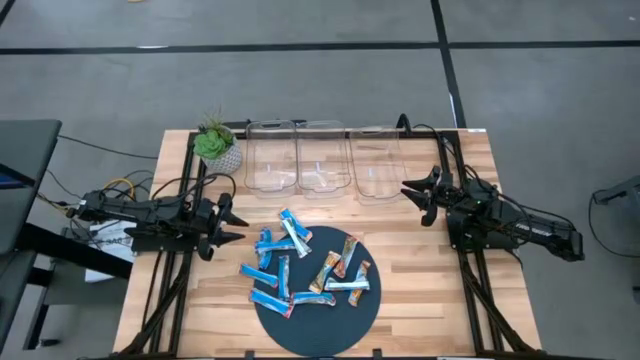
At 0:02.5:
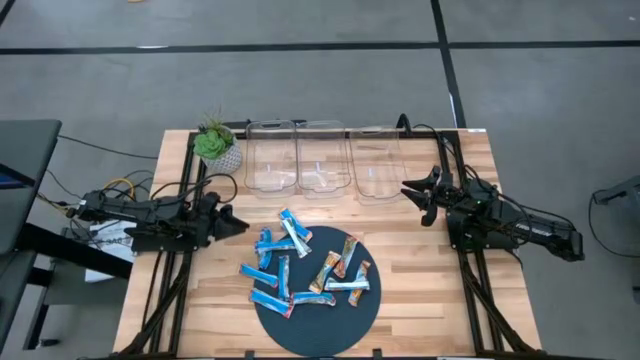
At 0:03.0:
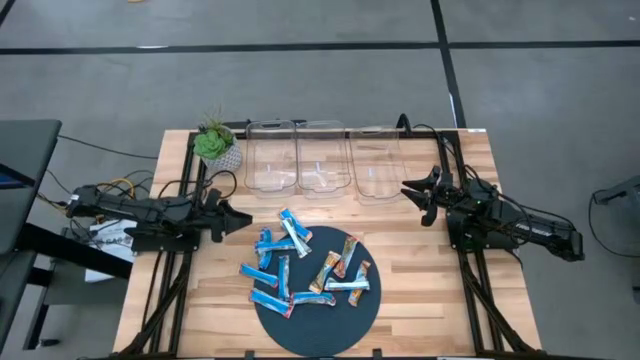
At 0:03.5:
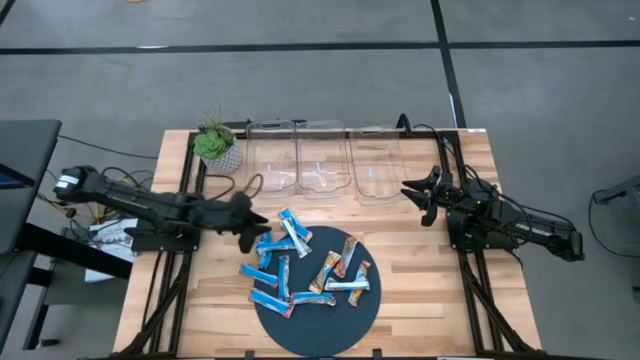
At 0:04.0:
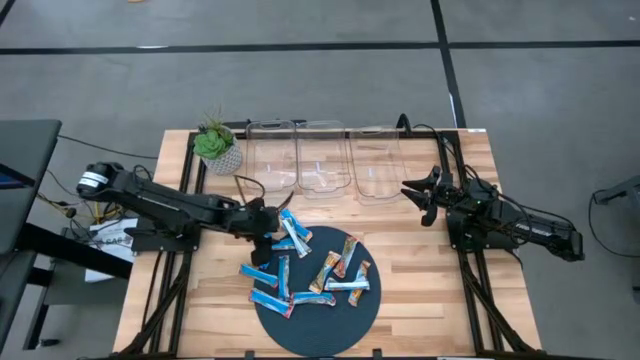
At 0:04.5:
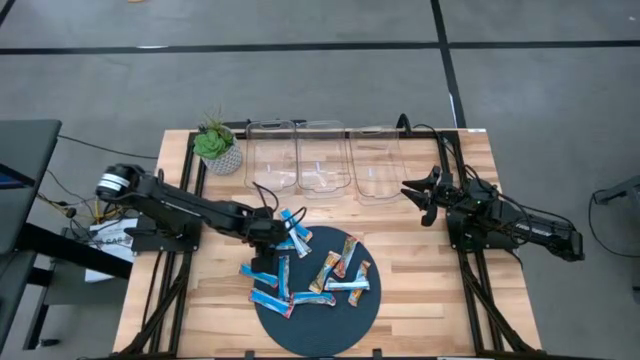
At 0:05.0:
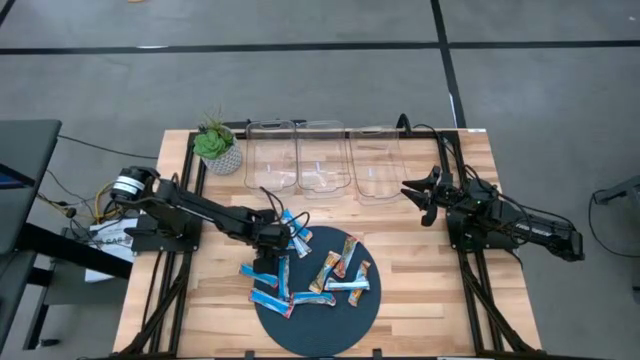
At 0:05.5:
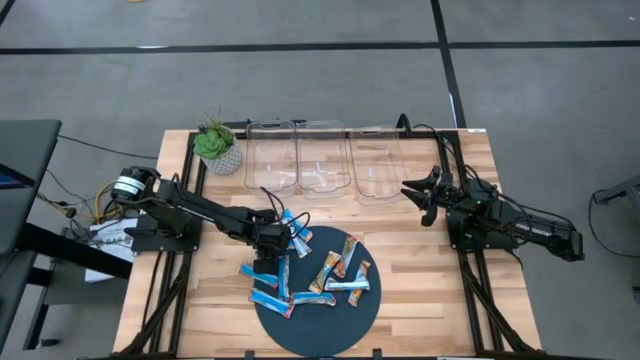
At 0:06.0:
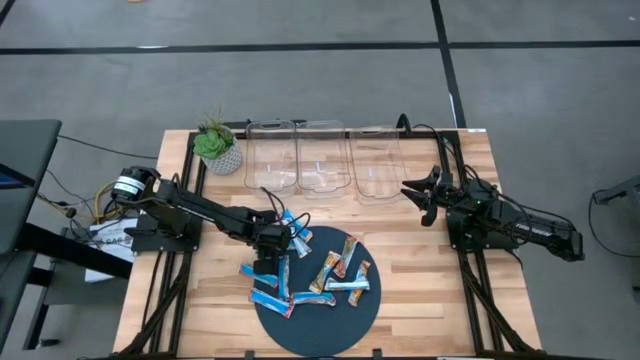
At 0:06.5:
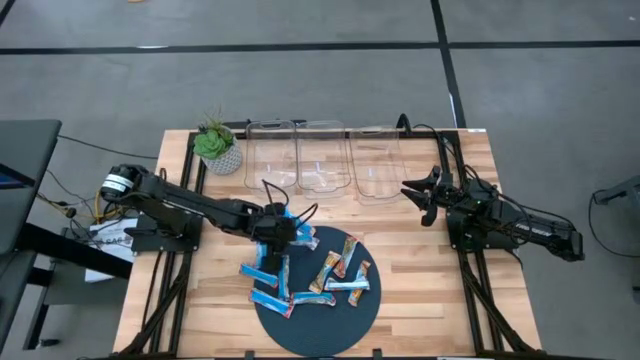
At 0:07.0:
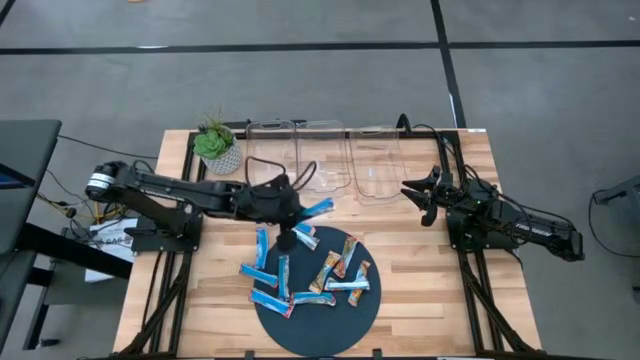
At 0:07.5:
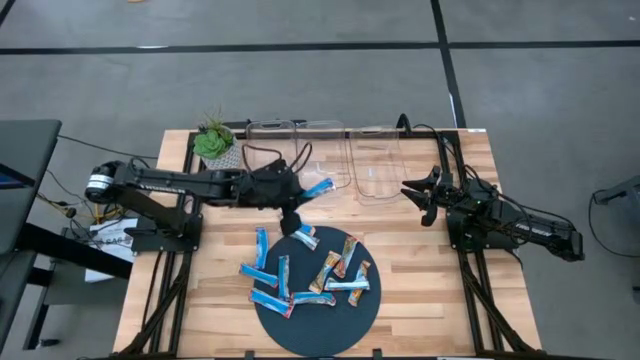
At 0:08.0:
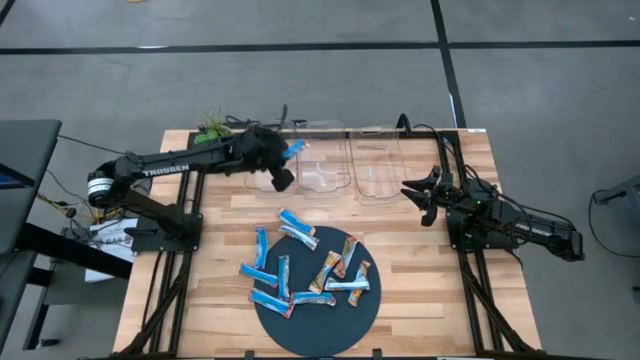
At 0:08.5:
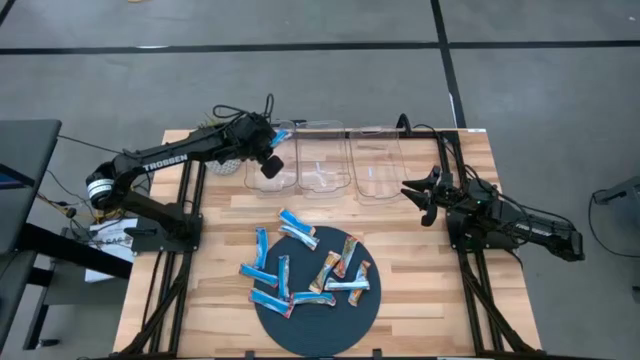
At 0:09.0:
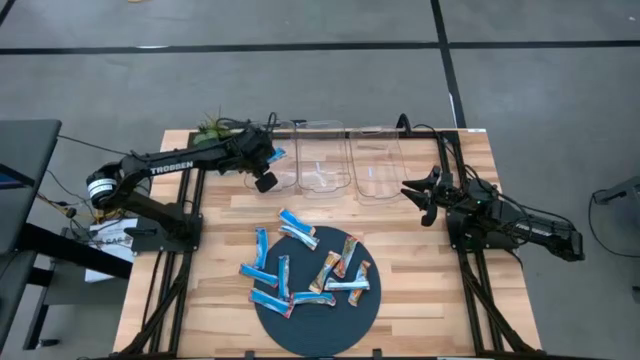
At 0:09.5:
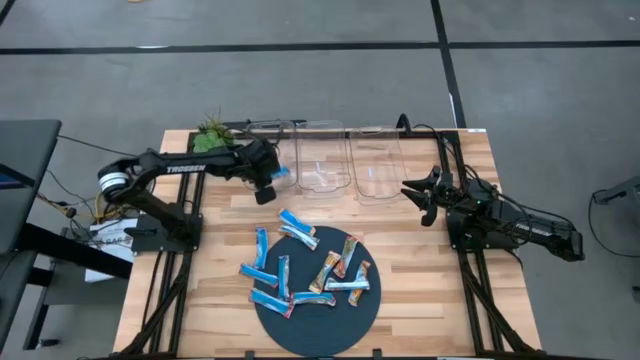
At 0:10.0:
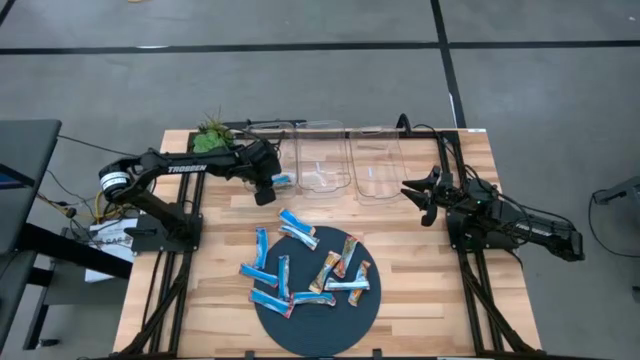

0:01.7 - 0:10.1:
Task: Pick and place Granola Bars by type
Put the blue granola bar into the left transparent bin

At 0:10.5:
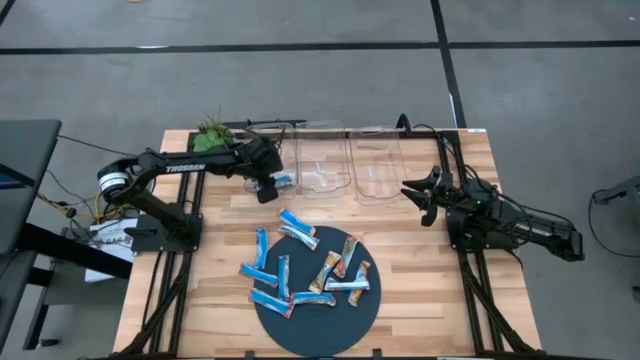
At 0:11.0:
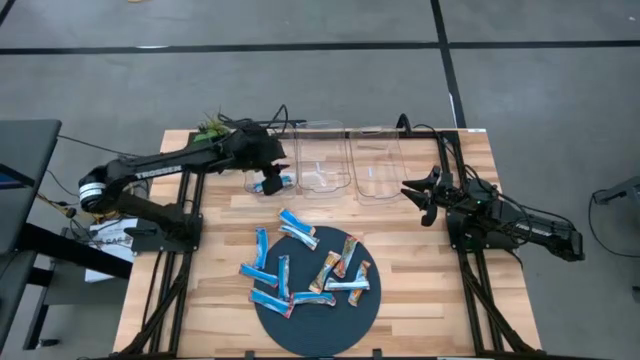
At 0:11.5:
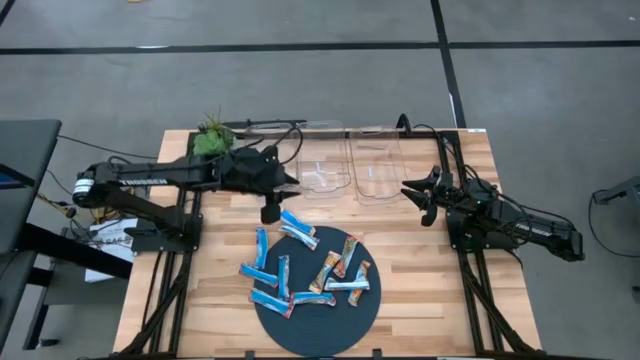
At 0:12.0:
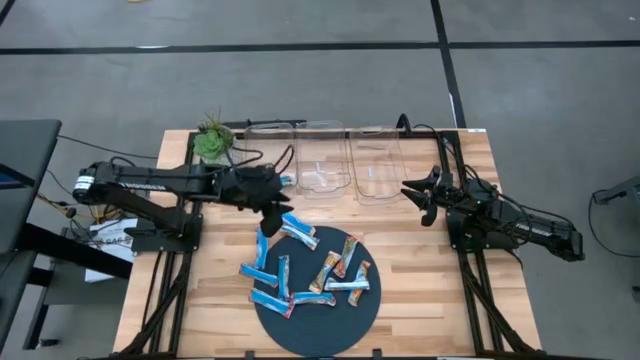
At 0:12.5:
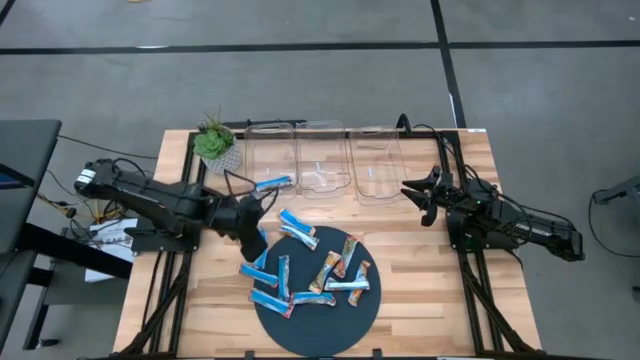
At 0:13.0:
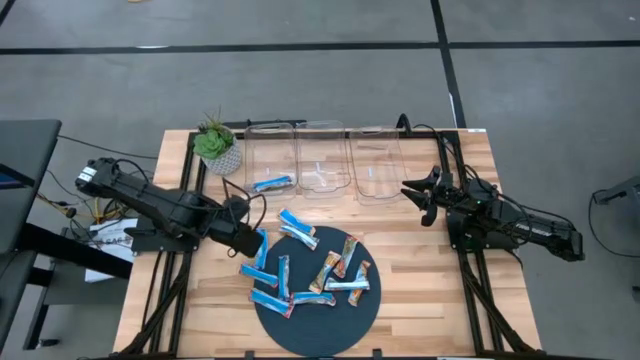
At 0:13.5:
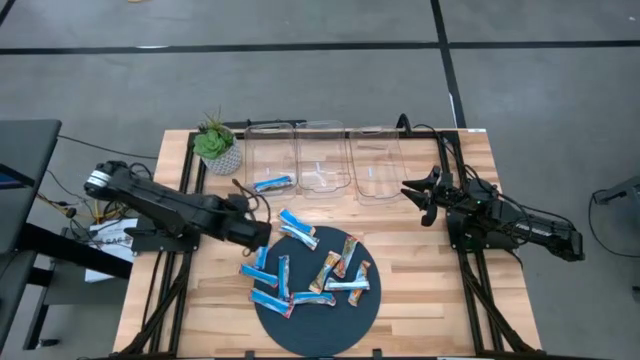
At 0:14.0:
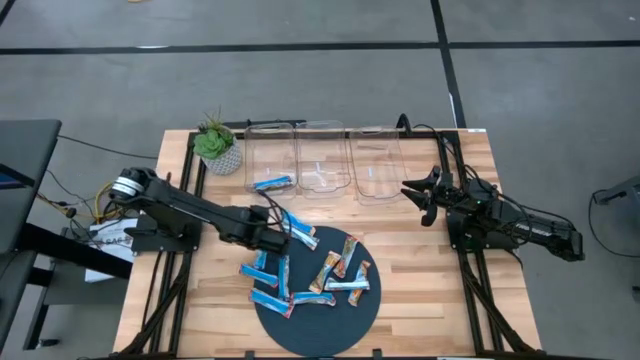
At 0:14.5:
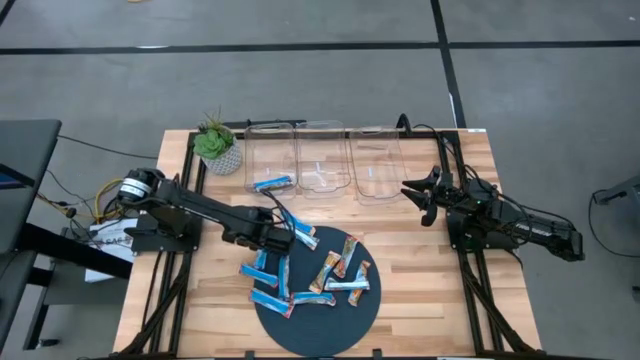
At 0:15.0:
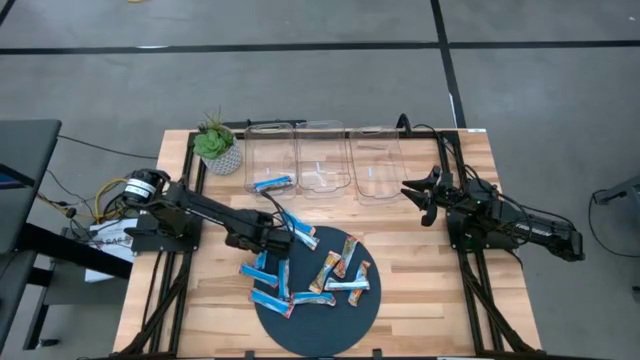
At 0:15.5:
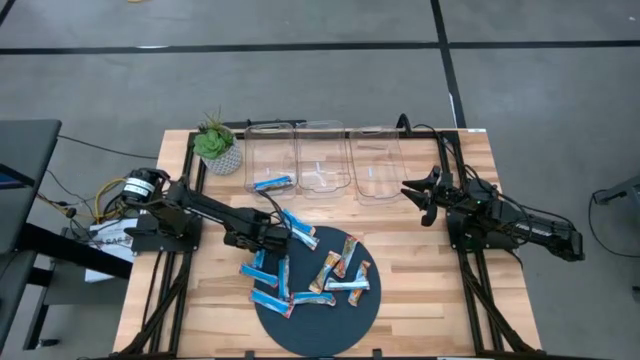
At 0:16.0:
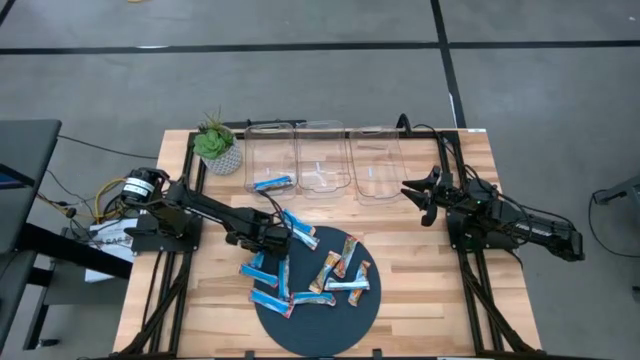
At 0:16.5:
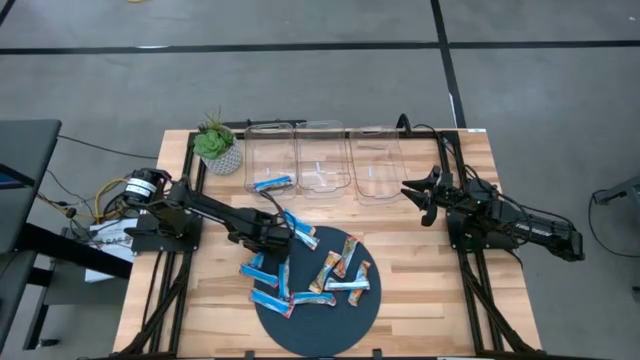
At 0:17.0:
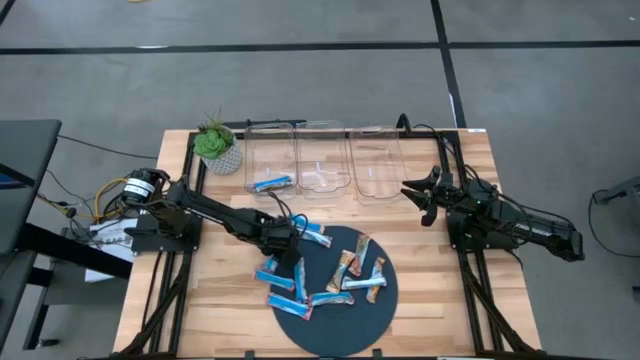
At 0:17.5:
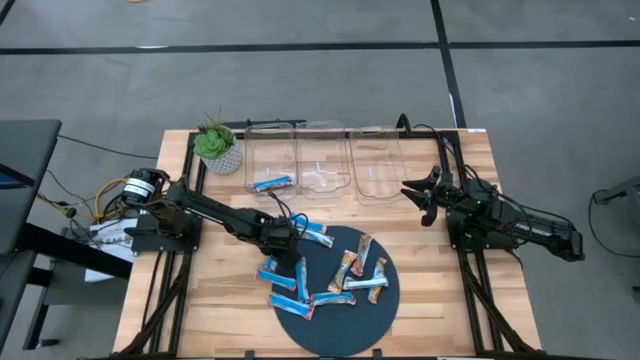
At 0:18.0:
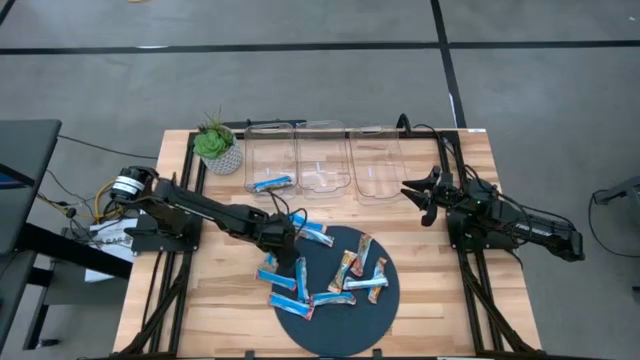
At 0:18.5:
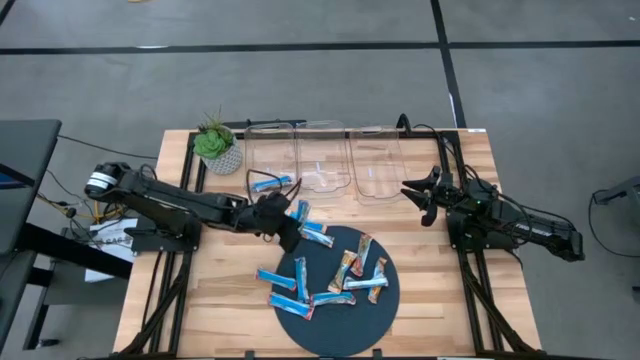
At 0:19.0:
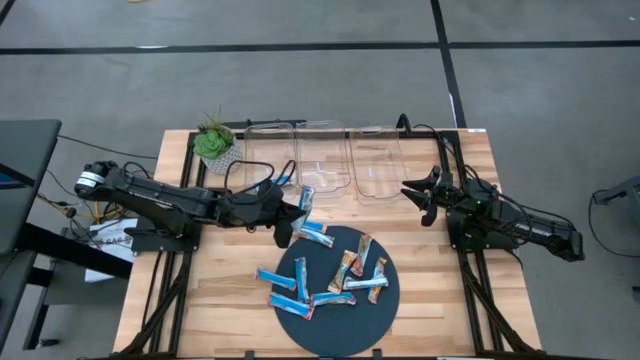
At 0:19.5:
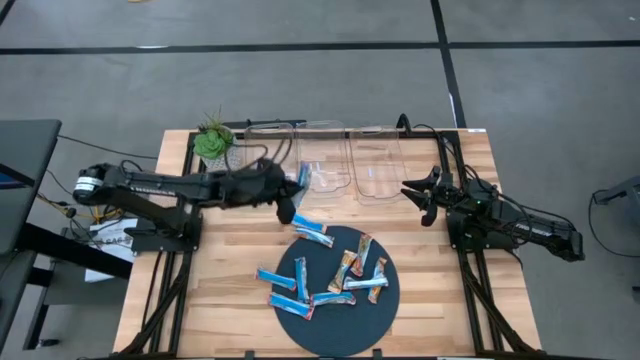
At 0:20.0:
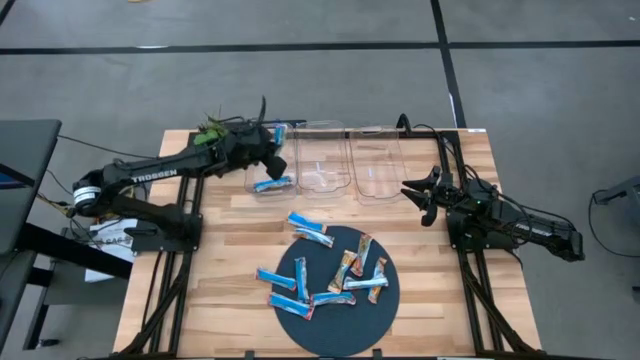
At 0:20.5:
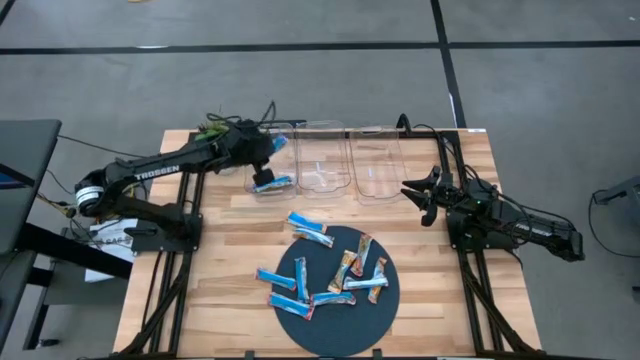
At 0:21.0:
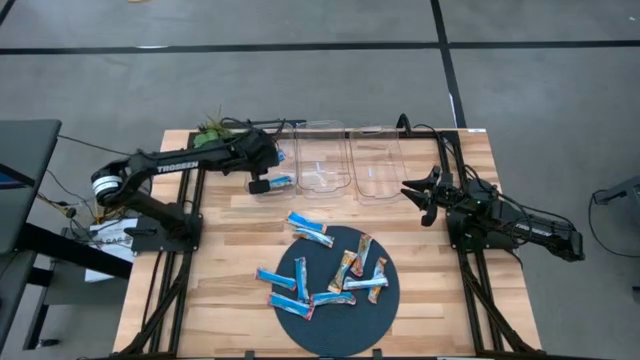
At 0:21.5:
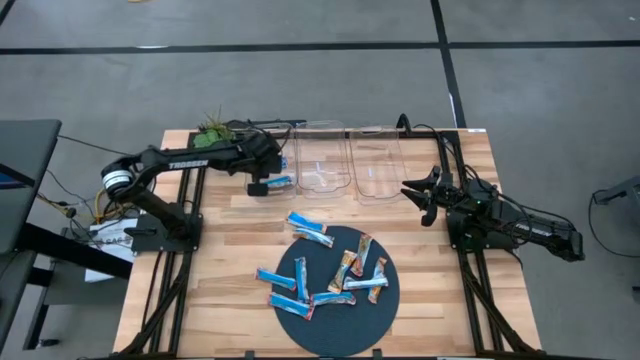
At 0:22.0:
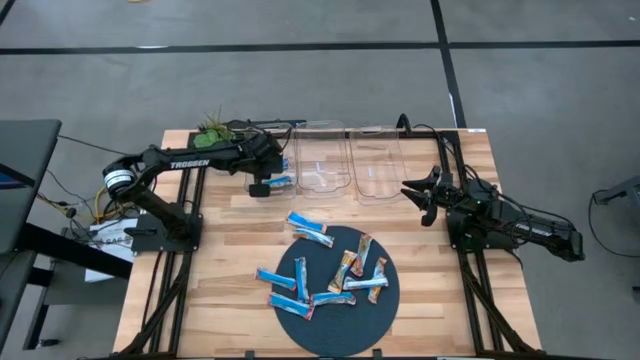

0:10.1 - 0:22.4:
Put the blue granola bar into the left transparent bin
